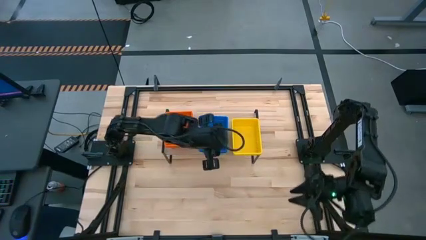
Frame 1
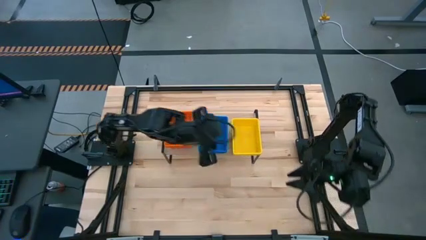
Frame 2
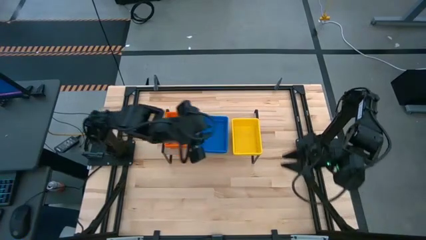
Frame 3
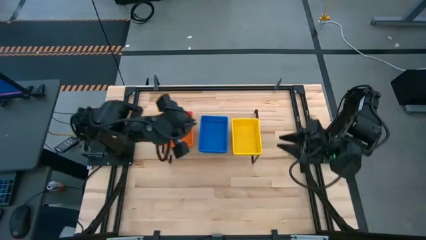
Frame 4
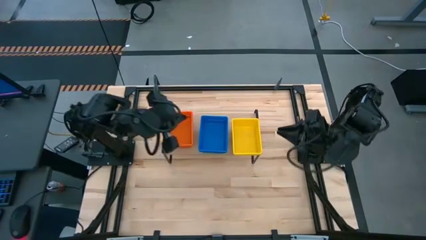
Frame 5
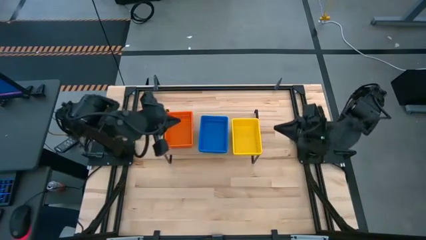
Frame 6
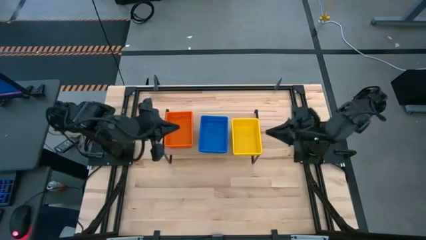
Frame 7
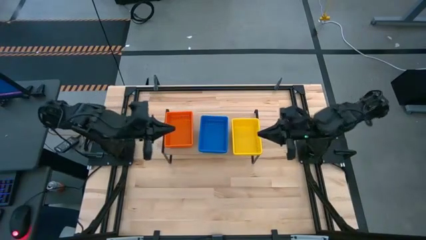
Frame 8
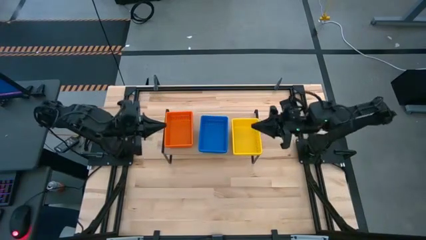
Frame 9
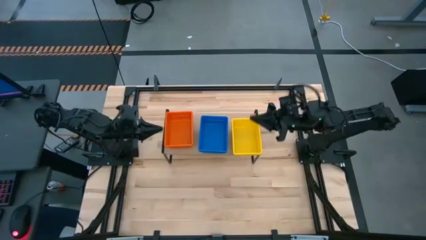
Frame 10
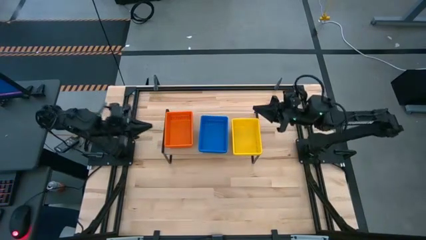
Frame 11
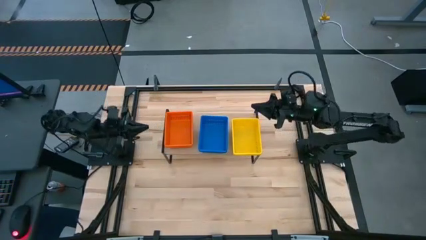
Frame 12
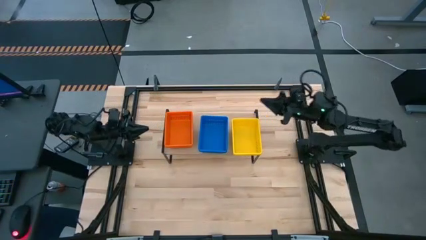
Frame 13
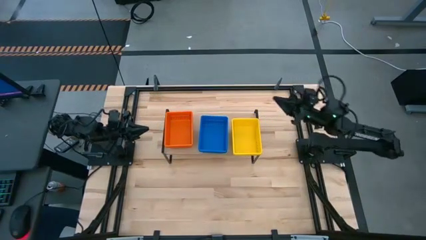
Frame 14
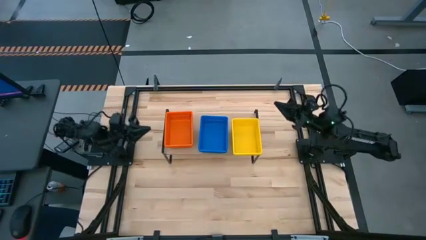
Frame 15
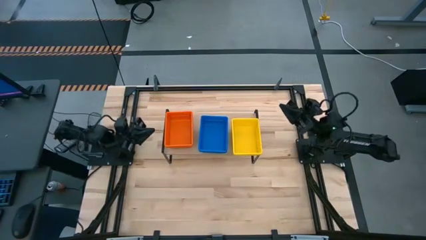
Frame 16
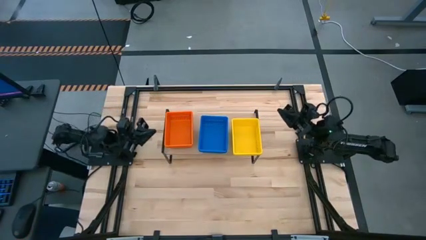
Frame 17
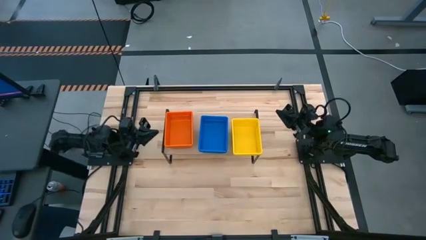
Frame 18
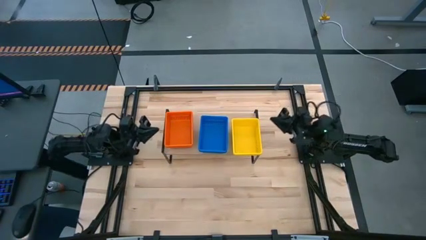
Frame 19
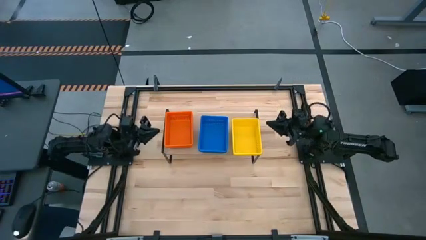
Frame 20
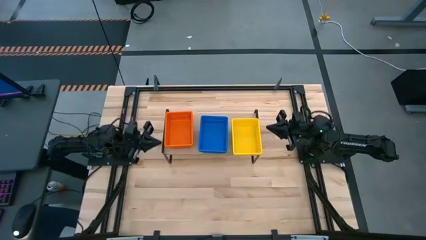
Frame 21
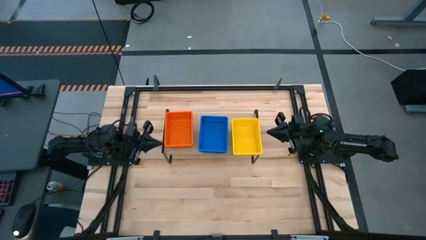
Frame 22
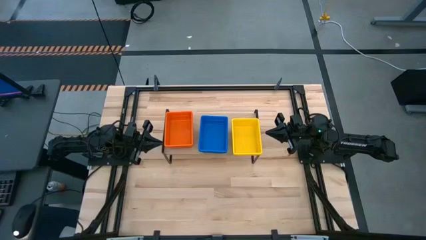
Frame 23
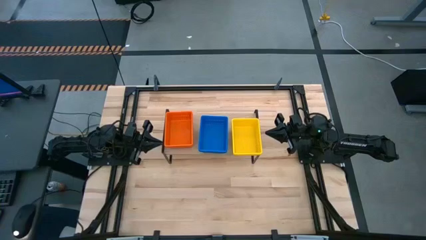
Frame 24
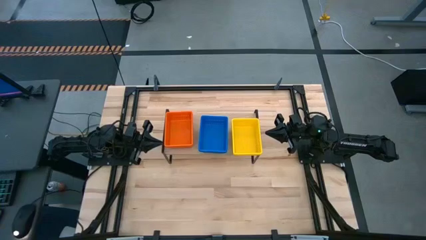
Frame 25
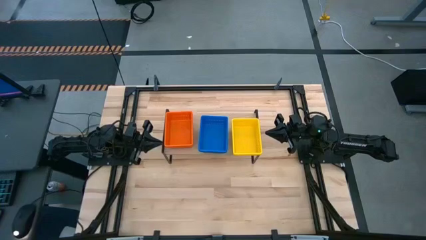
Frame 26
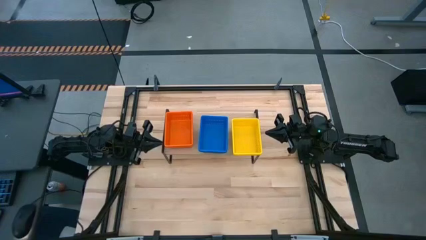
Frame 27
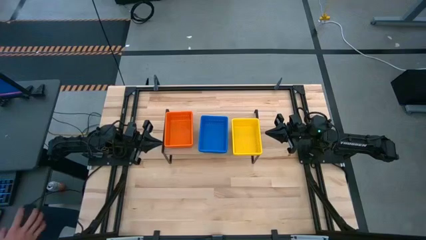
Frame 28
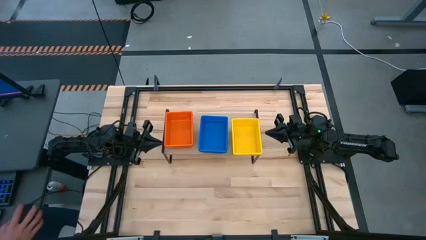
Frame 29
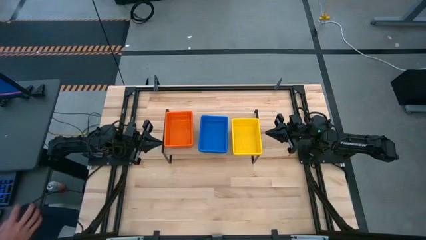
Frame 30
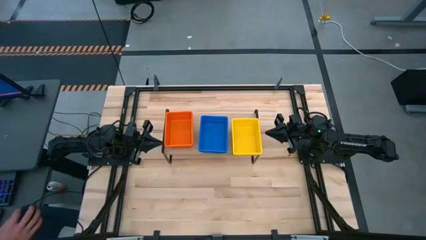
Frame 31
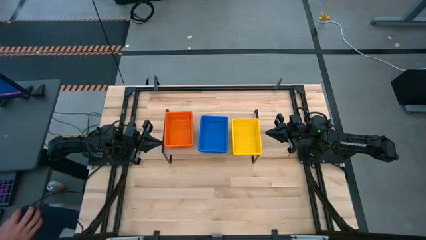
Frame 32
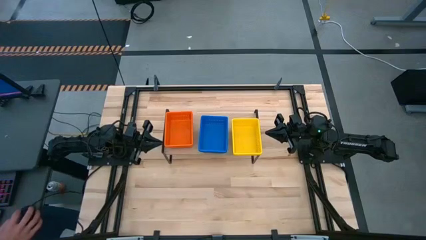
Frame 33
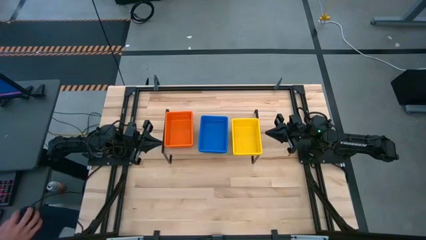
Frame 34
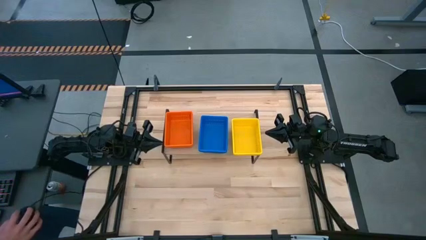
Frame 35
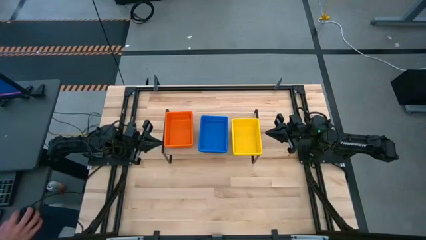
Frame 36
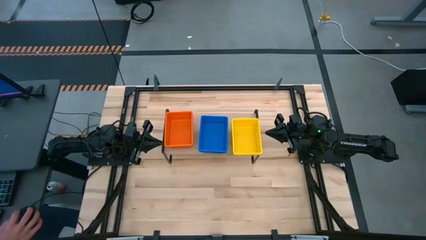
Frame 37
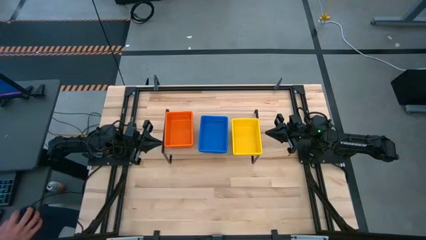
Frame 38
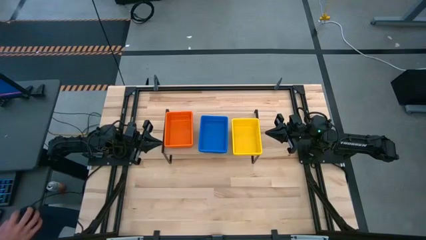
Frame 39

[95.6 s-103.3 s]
Task: Stack baskets on shelf by color
Return to Home Position

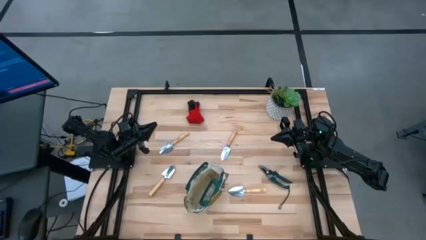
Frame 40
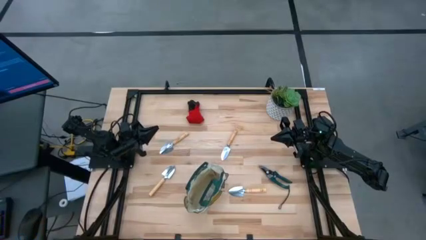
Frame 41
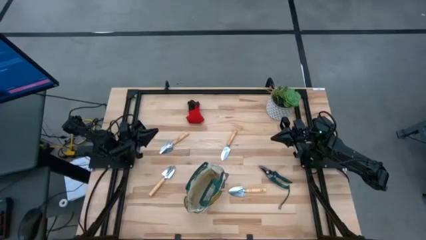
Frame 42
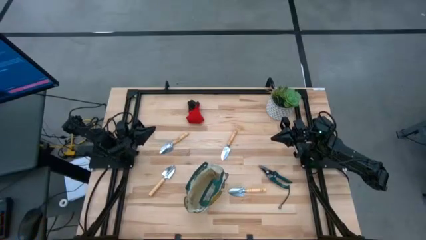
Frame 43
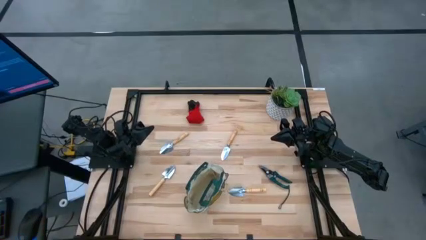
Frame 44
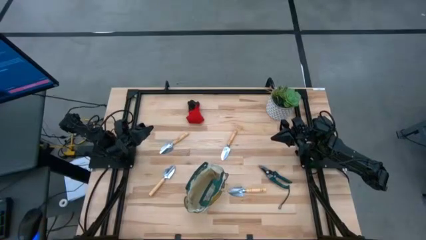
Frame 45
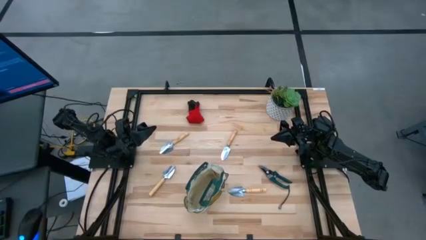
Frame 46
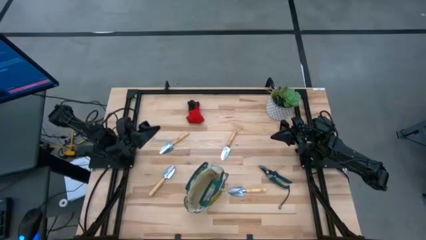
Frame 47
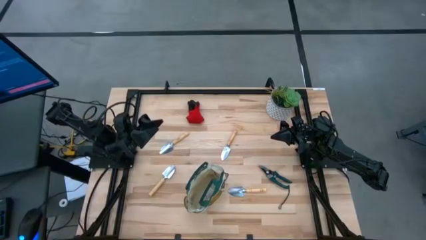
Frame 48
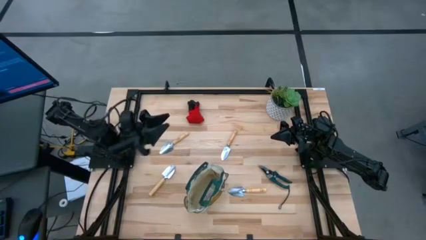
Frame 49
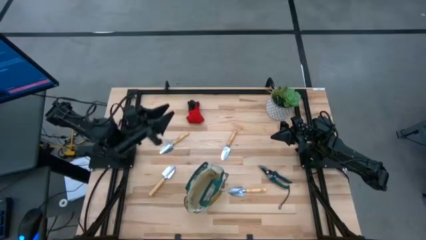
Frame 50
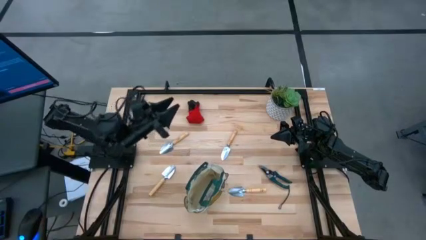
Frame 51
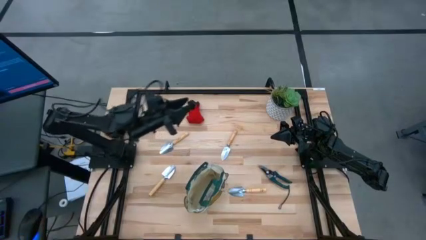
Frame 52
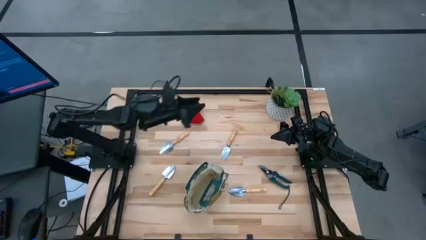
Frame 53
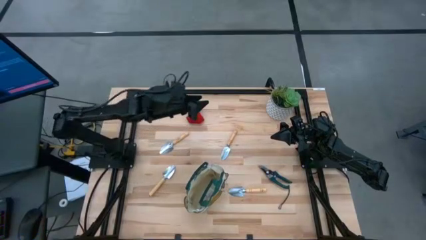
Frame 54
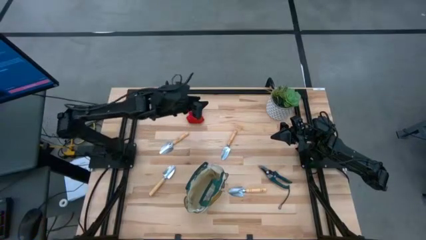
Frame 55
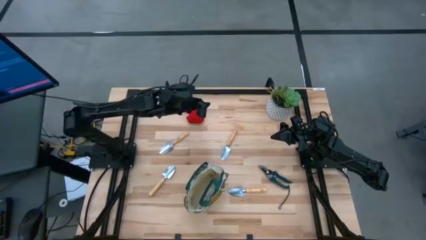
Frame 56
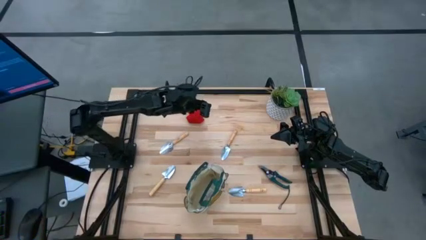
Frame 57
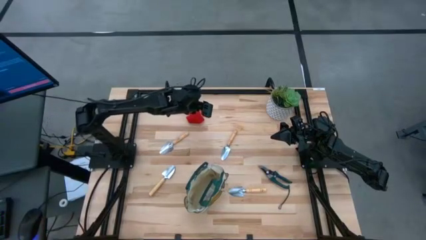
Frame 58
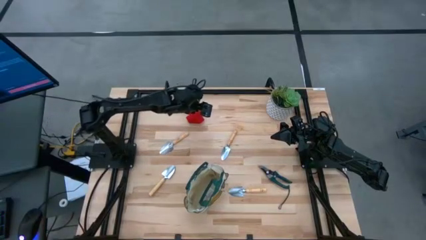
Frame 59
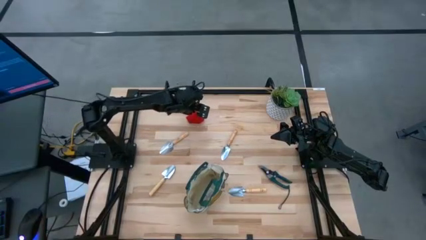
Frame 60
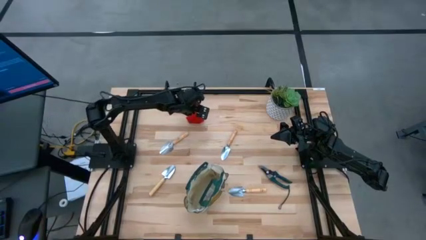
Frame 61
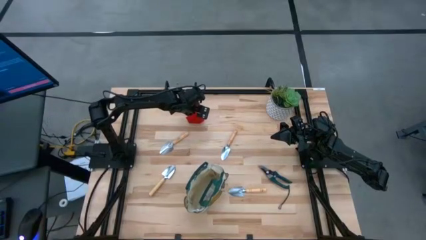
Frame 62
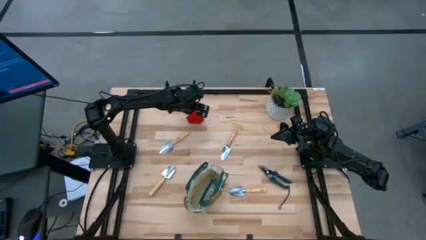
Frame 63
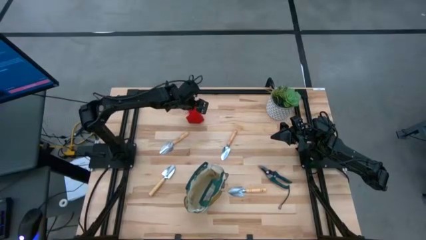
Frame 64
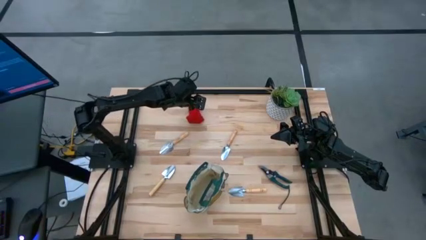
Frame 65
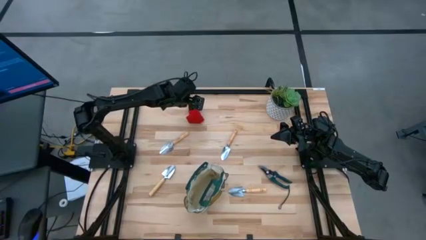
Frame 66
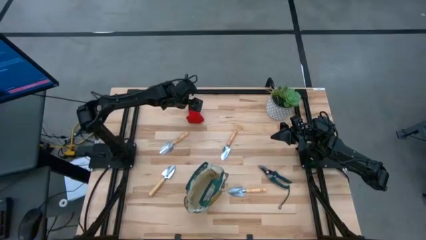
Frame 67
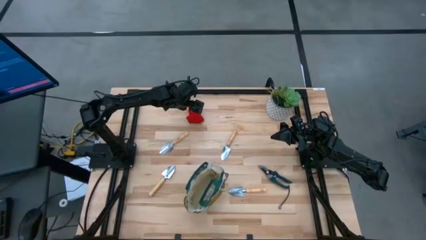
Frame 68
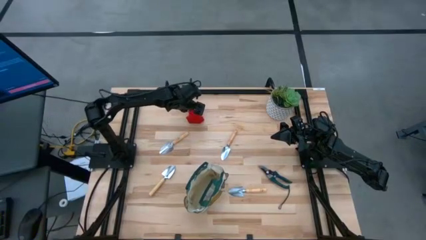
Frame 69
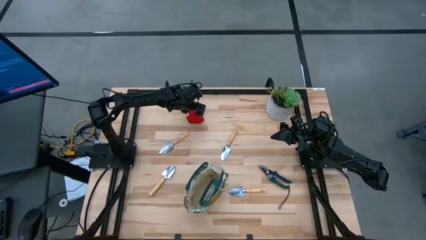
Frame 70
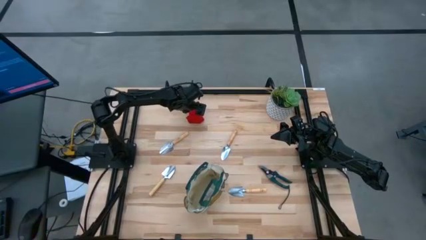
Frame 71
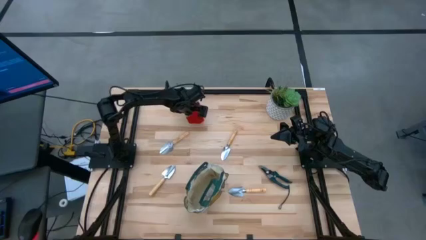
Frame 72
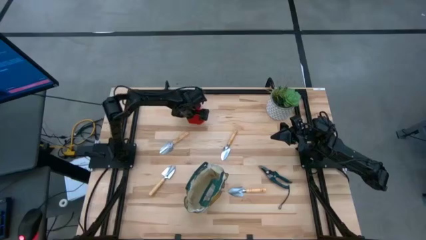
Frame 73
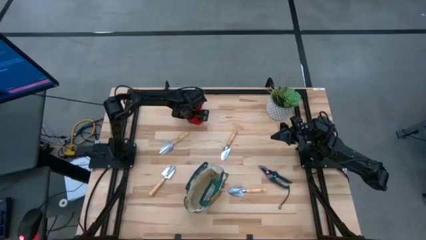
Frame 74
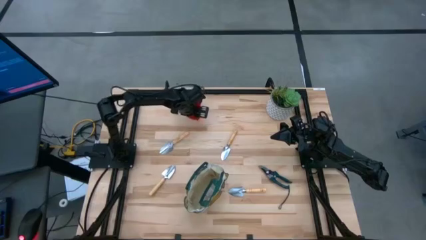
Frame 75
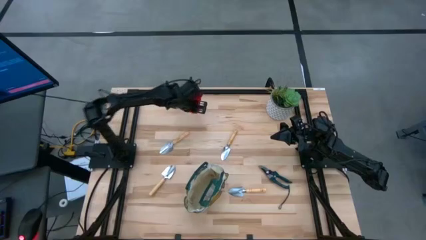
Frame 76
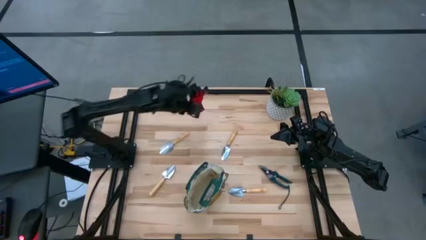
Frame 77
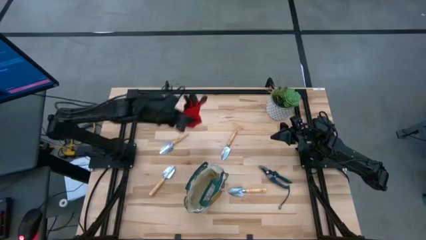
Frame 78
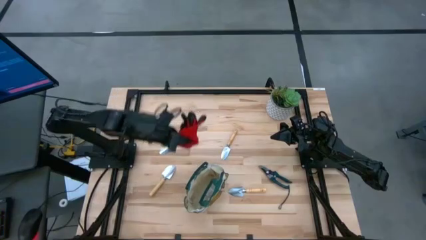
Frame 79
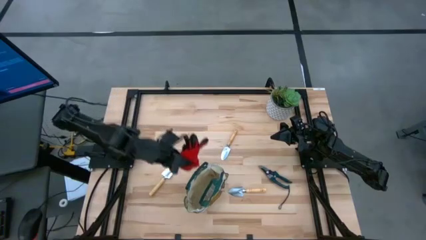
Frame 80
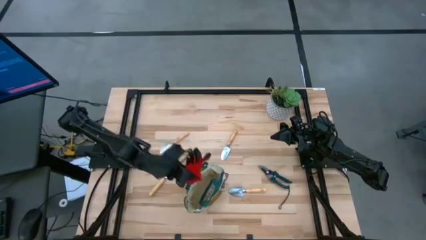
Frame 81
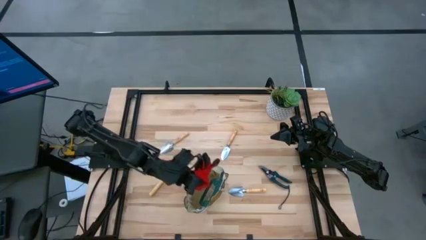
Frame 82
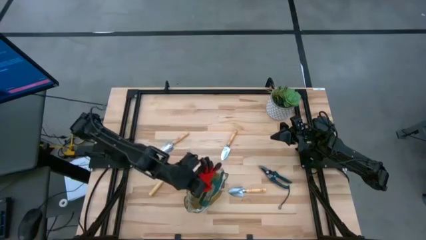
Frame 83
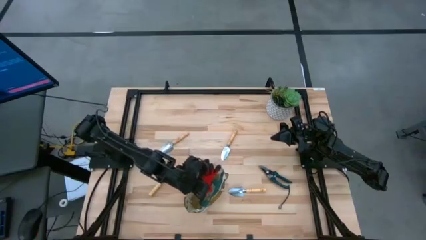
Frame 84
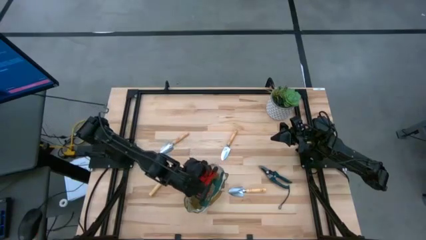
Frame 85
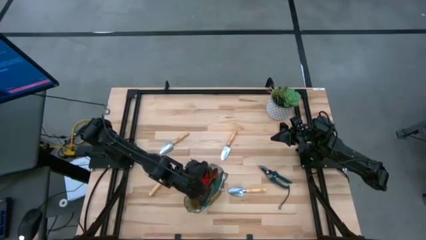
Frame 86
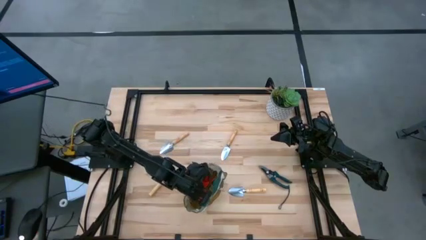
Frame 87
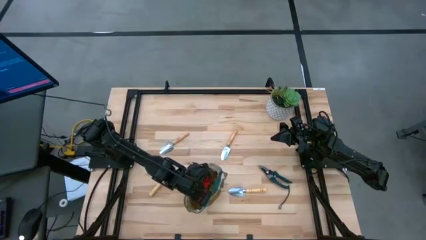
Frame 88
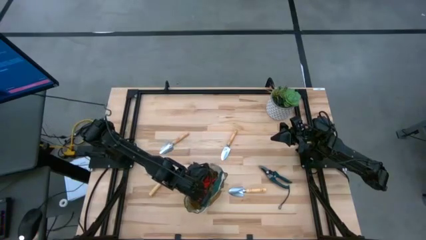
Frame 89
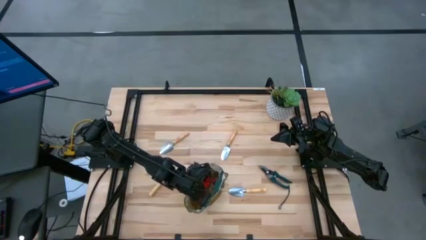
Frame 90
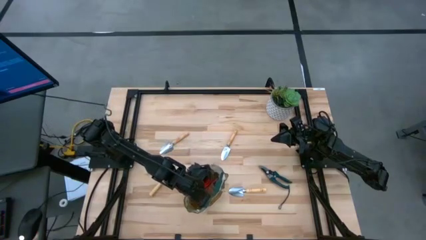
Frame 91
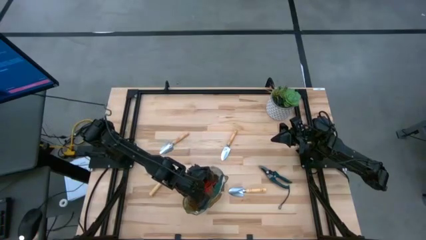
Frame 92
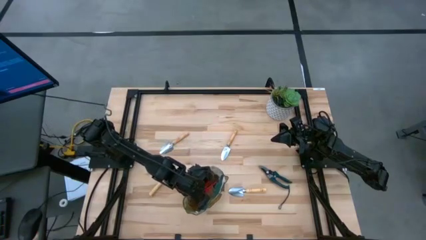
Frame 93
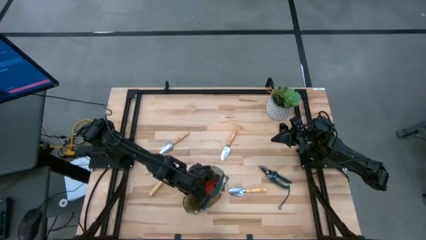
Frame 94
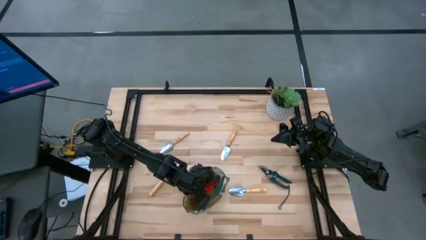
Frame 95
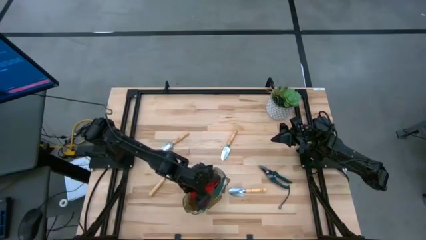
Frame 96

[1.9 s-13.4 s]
Task: Pick & Place Garden tools in Gardening bag
Put the red gloves into the gardening bag
